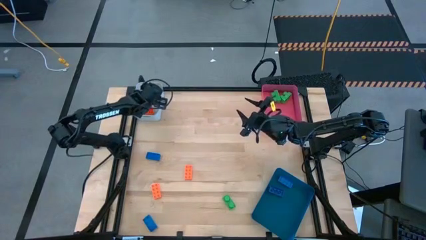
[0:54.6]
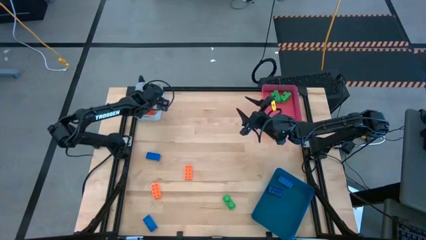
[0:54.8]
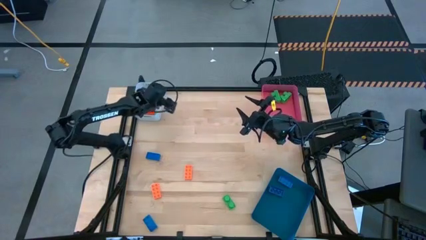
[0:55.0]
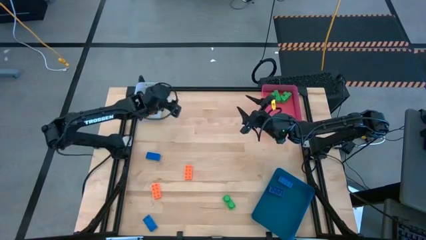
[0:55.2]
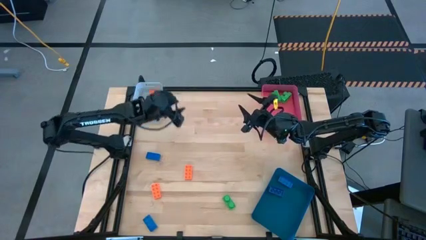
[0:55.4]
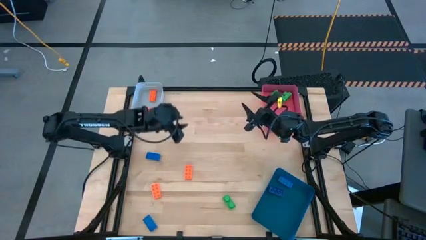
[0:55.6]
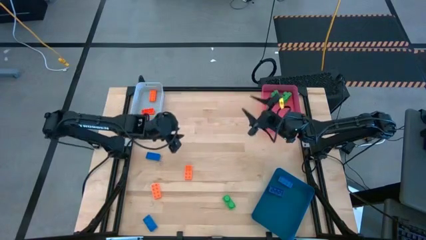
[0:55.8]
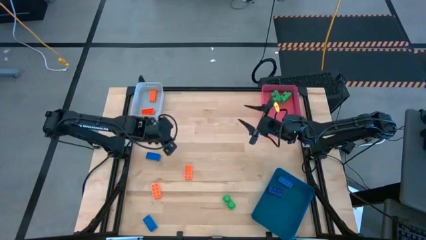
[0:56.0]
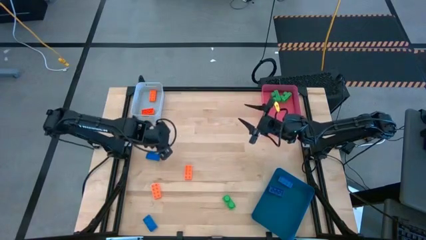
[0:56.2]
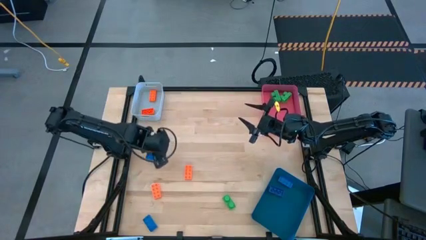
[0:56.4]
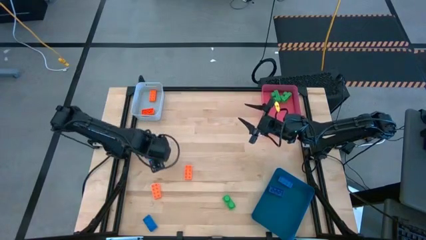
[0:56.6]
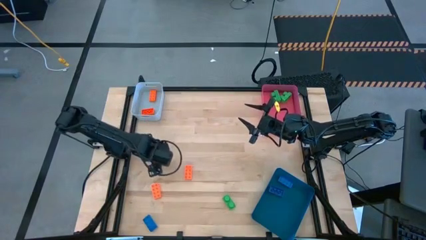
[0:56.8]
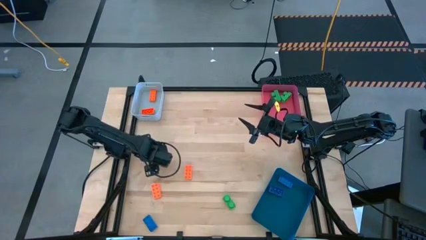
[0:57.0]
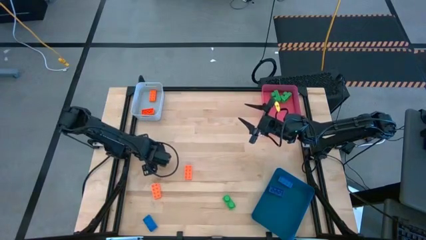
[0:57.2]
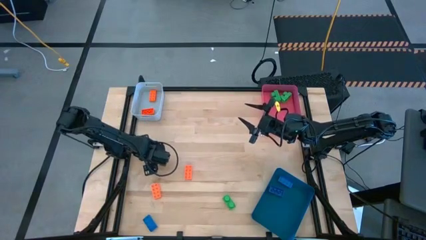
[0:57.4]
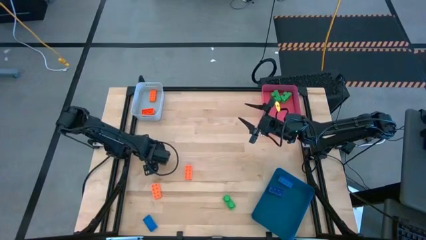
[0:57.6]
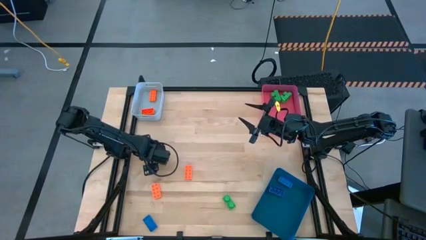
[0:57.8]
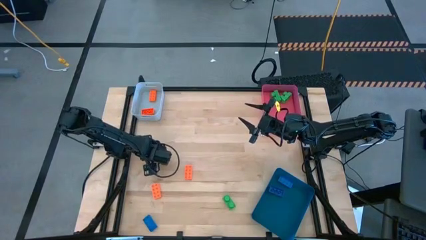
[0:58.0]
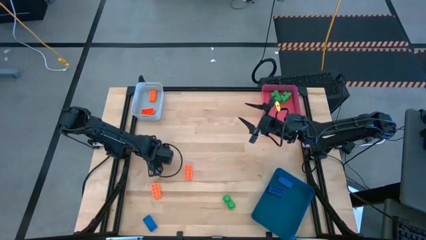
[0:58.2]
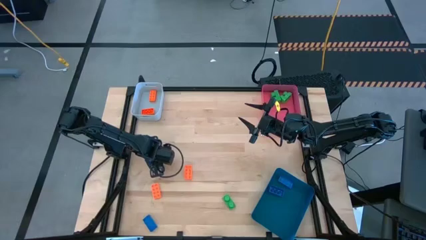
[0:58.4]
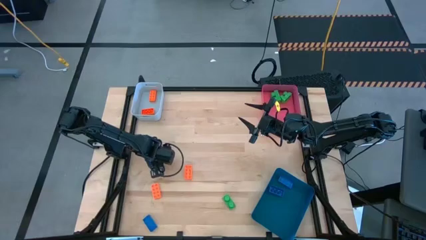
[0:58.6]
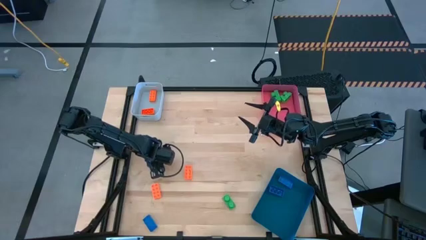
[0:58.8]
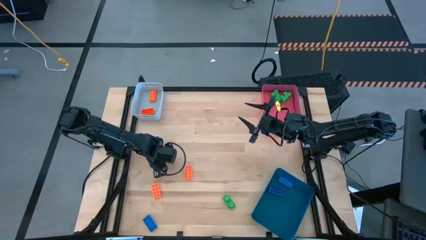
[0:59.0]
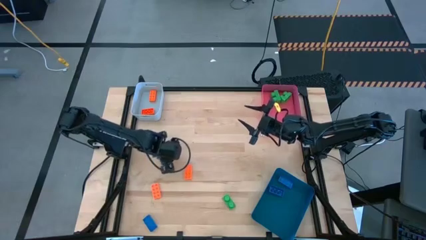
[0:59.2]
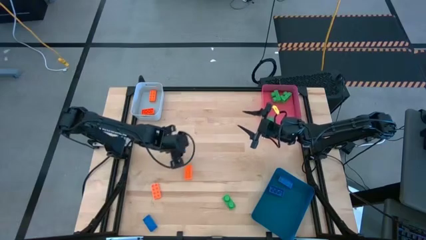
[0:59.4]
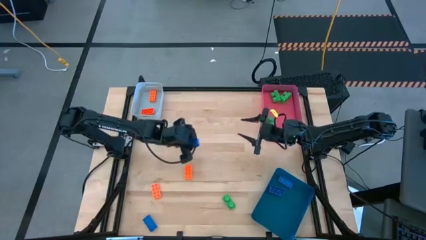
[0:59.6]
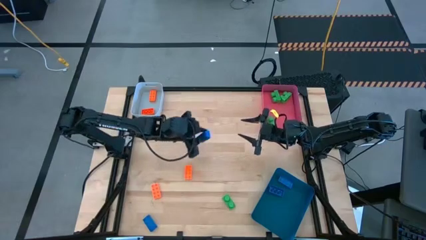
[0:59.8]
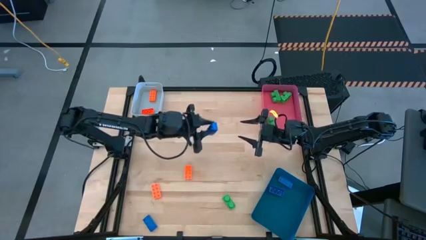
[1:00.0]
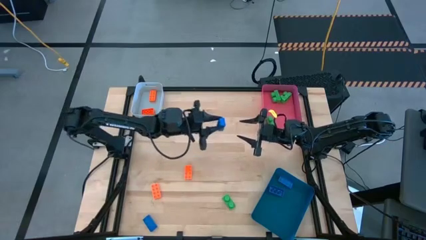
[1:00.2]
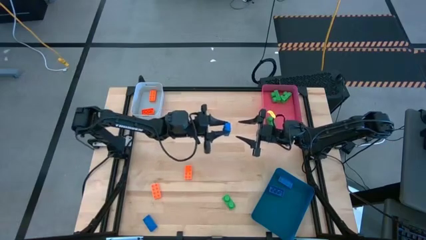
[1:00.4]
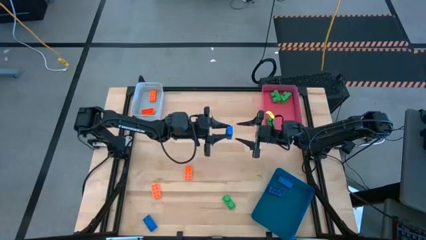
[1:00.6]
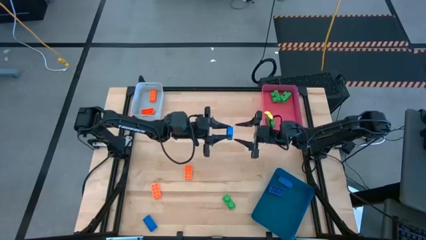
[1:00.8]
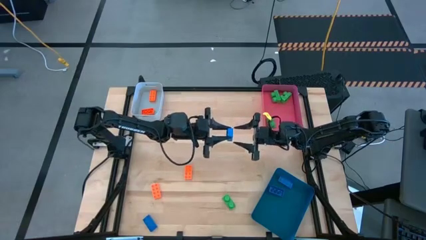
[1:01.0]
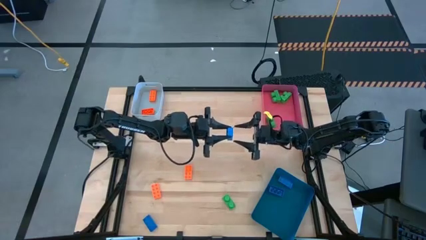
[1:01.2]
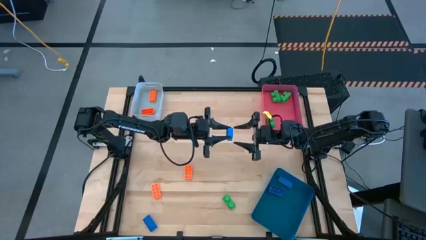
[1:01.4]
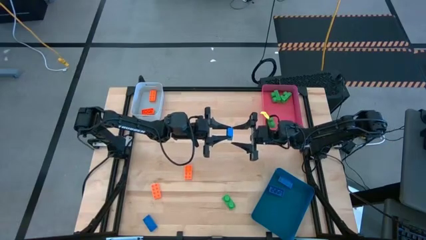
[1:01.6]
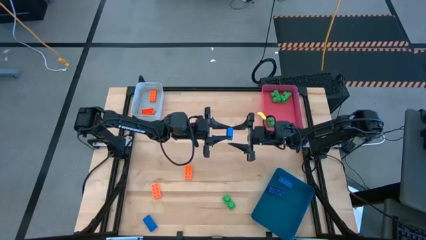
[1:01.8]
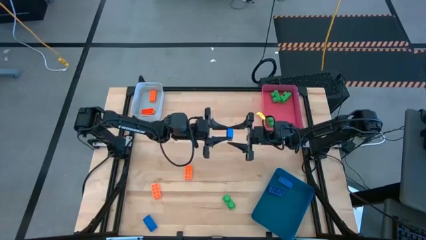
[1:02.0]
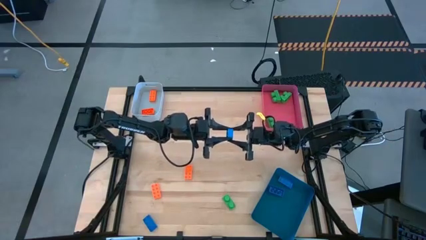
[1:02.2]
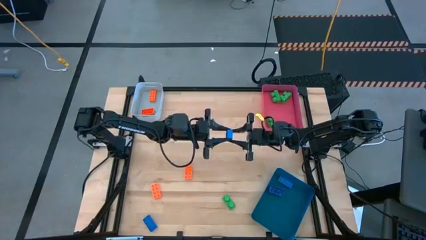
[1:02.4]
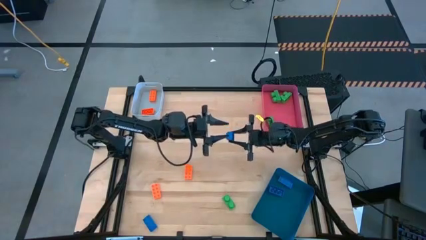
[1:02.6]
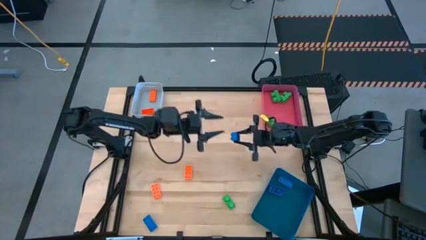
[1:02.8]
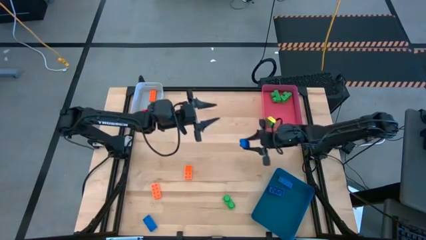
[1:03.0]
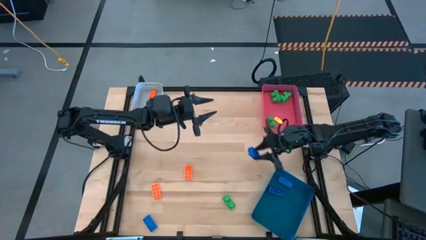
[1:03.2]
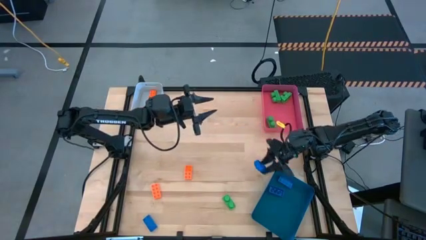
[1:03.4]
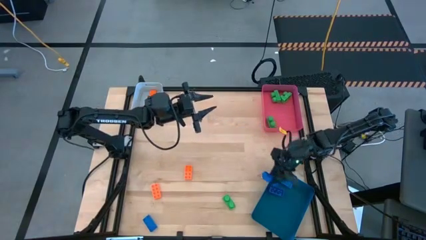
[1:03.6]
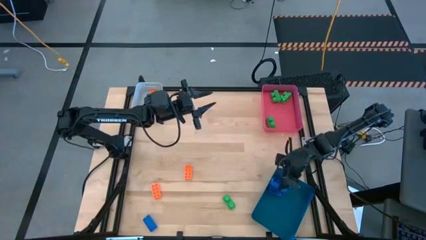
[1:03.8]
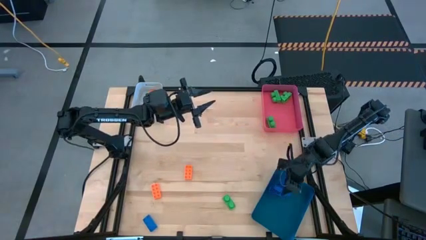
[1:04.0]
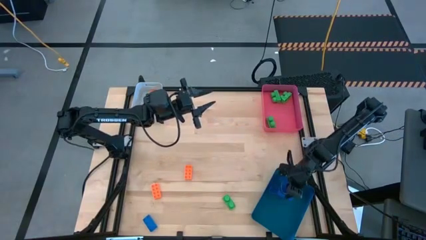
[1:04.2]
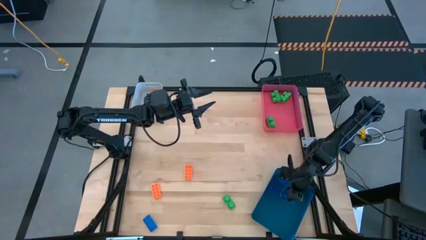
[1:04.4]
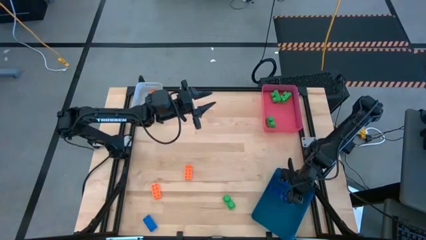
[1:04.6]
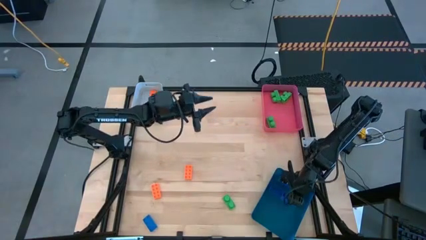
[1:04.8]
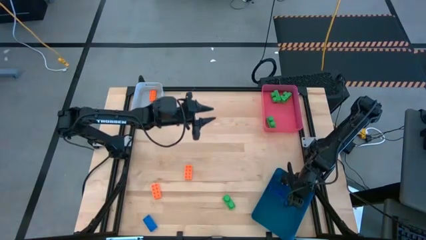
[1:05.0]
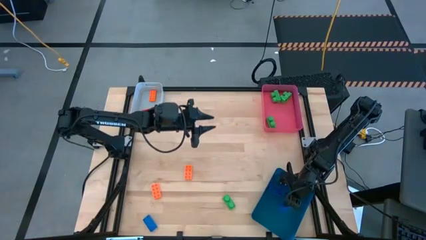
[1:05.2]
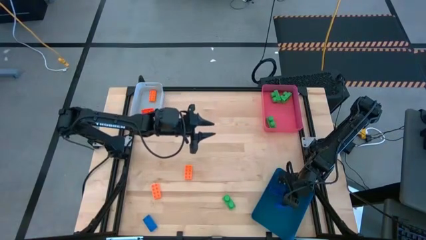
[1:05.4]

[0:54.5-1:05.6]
Task: Sort & place blocks by color
Put the blue gamepiece into the blue bin

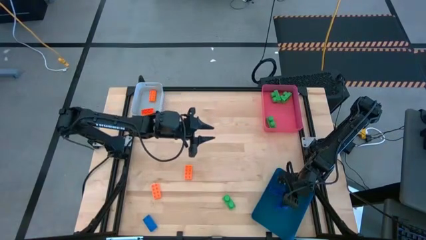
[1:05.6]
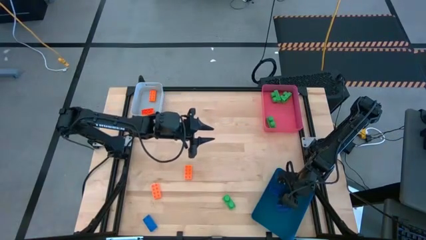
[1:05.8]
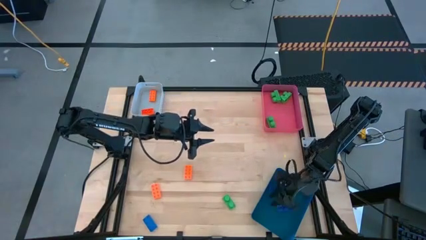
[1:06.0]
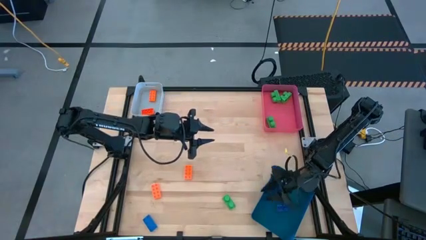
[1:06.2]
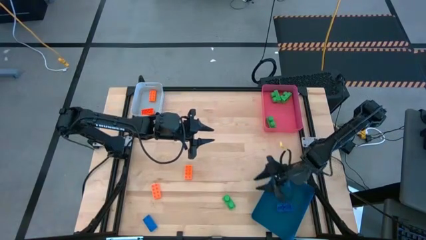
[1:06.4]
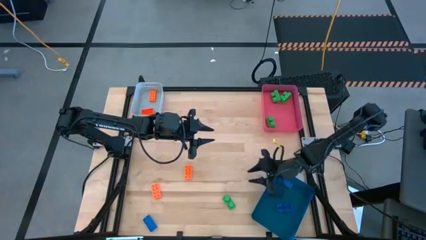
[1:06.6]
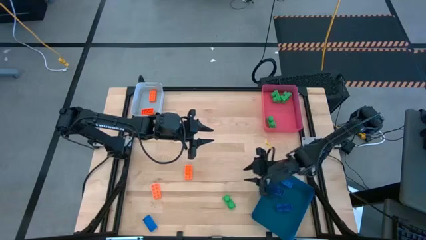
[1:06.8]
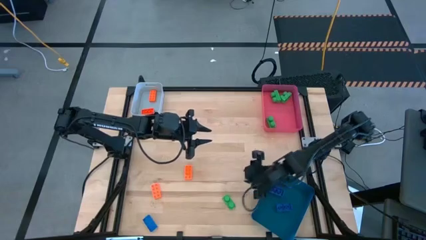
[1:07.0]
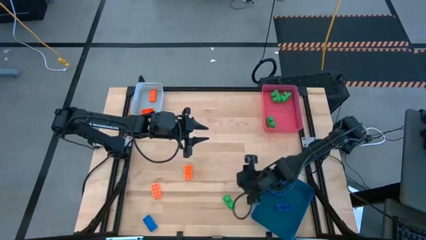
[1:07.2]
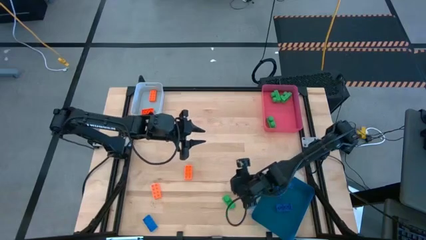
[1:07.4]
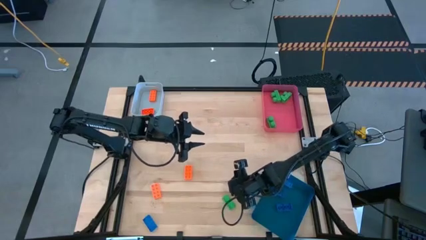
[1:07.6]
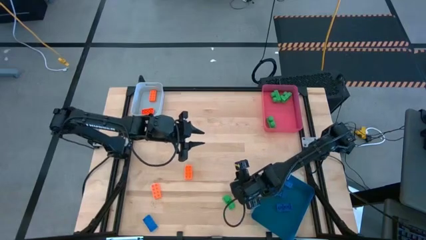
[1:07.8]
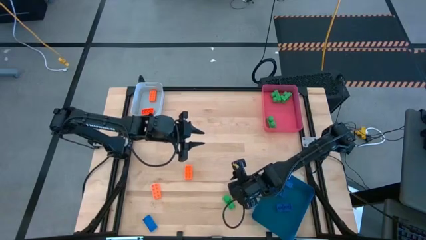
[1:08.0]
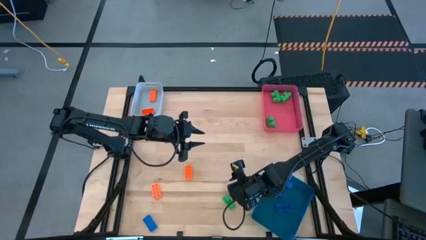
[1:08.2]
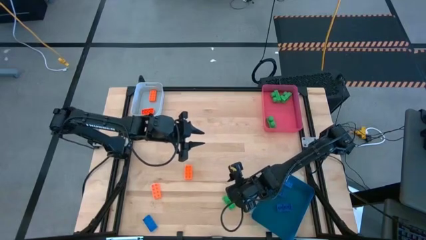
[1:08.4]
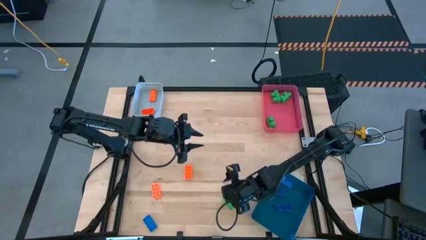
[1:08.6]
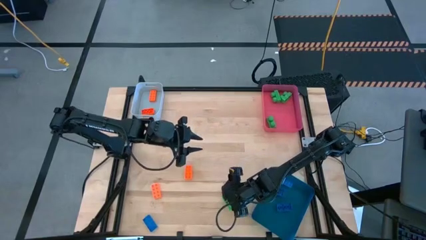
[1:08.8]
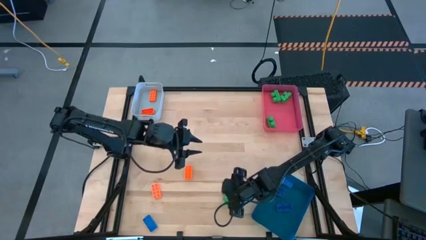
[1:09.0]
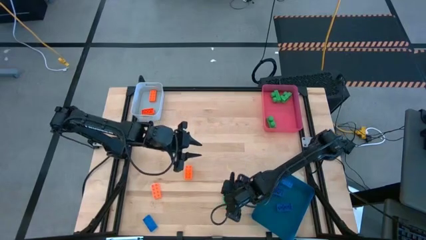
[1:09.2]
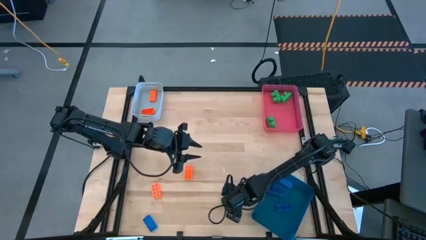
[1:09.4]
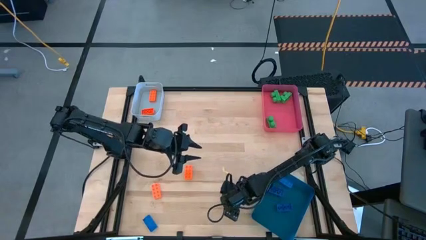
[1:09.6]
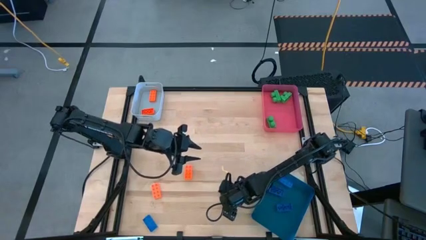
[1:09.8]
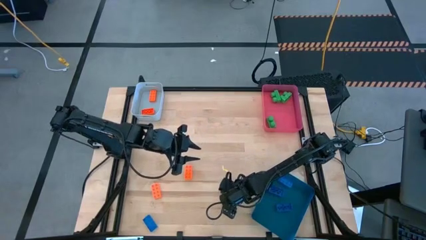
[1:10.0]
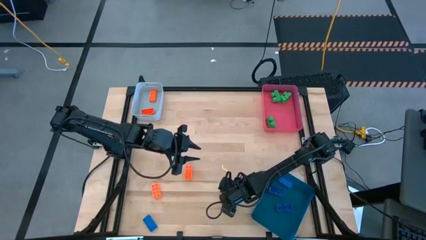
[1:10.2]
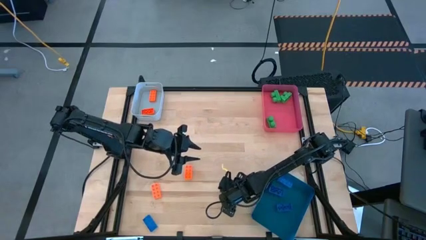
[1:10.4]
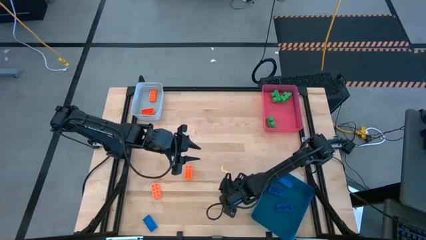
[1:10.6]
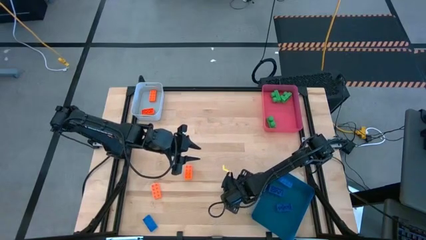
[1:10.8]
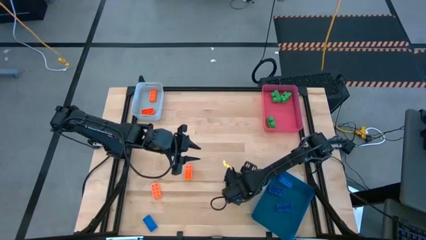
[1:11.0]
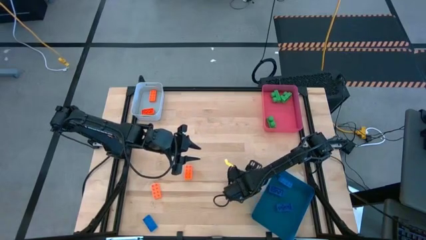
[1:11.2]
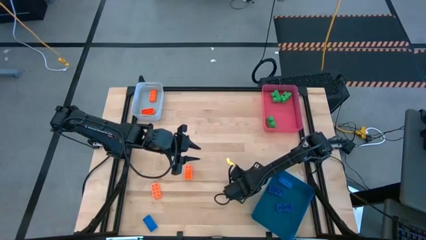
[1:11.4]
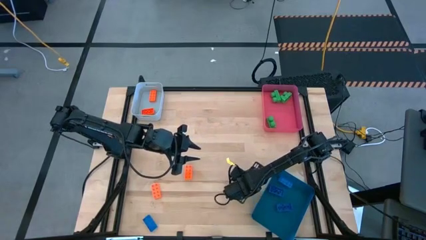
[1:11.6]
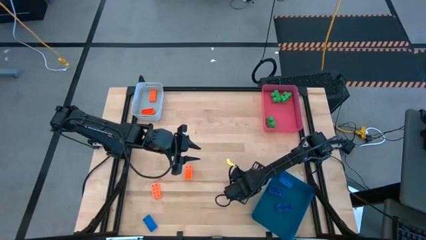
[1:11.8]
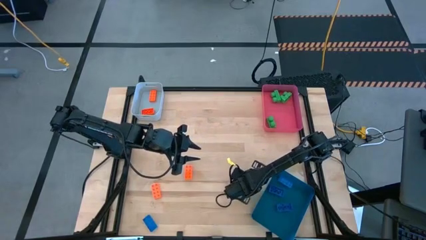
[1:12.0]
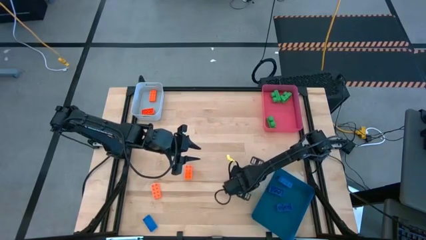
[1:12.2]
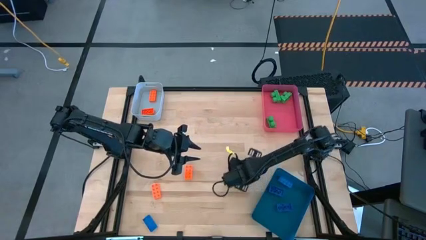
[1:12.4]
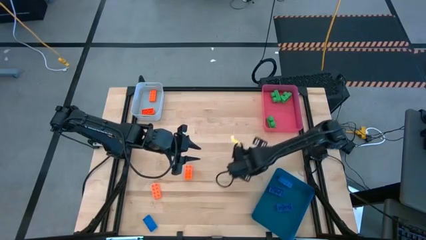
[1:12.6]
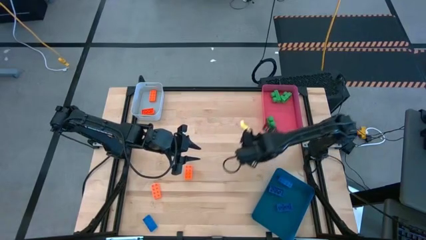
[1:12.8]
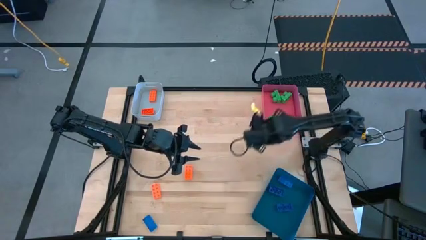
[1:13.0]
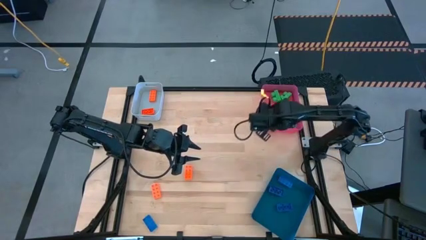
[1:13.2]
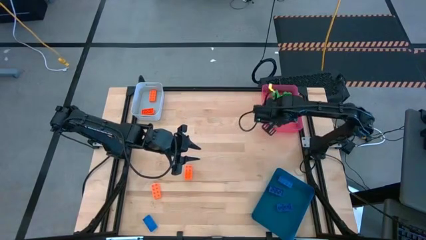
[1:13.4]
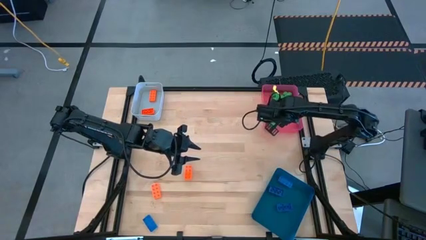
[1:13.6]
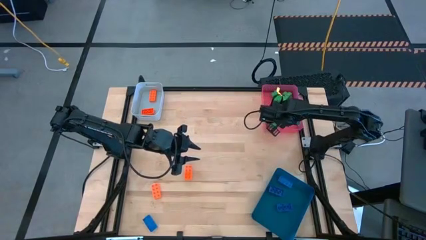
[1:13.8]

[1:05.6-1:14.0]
Put the green gamepiece into the pink bin
